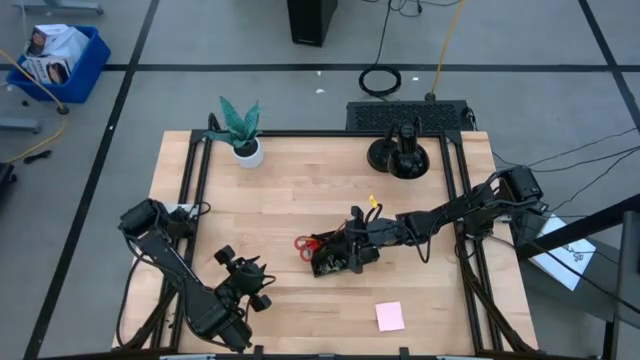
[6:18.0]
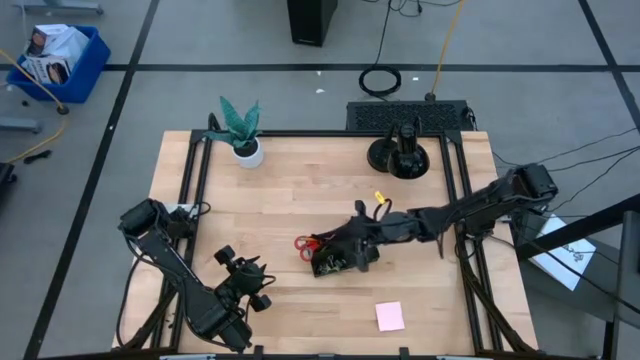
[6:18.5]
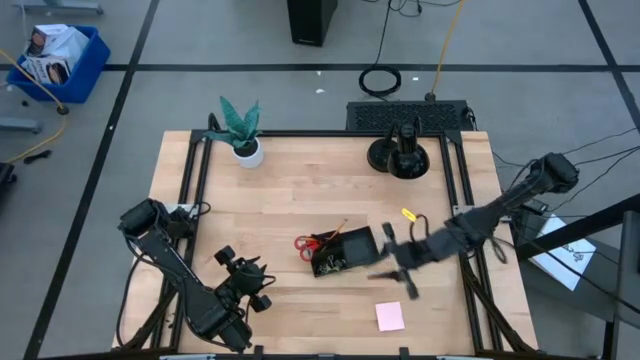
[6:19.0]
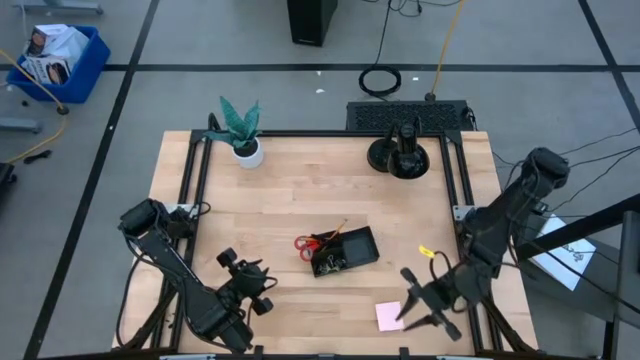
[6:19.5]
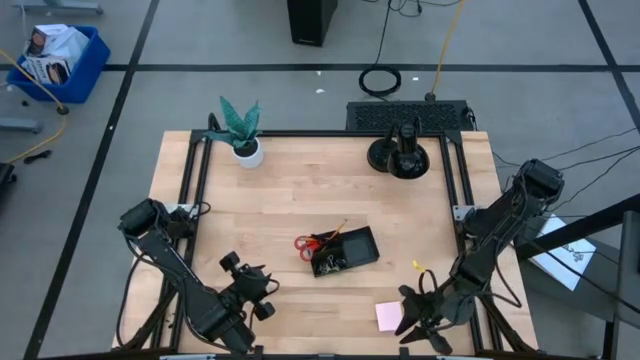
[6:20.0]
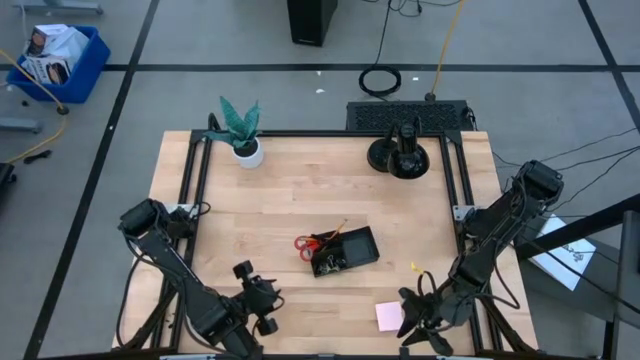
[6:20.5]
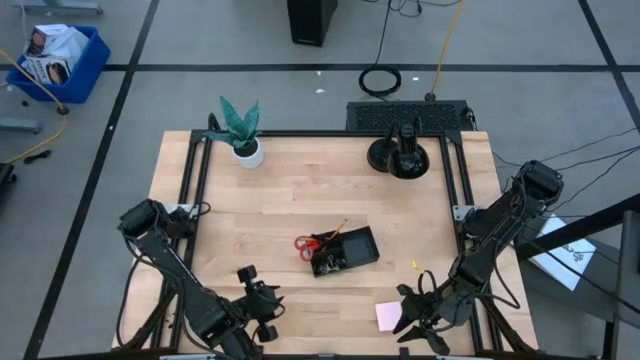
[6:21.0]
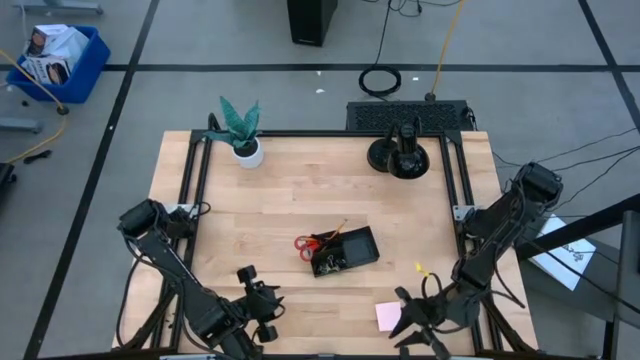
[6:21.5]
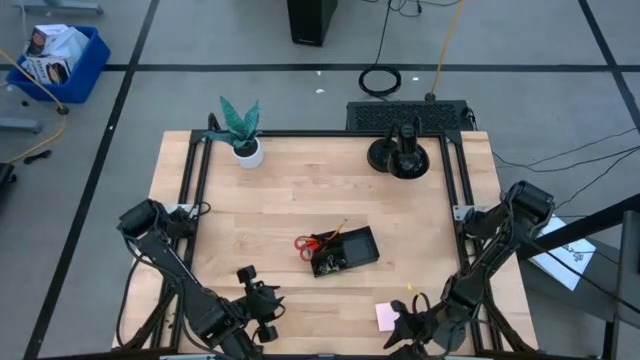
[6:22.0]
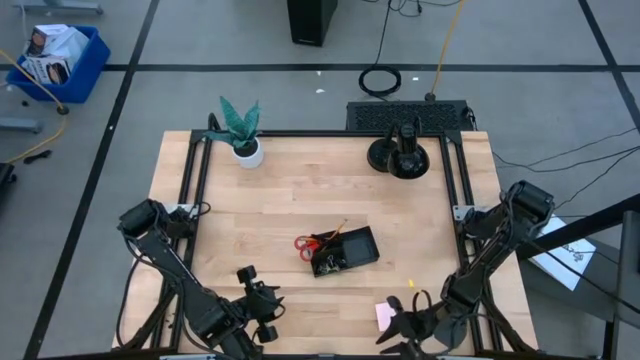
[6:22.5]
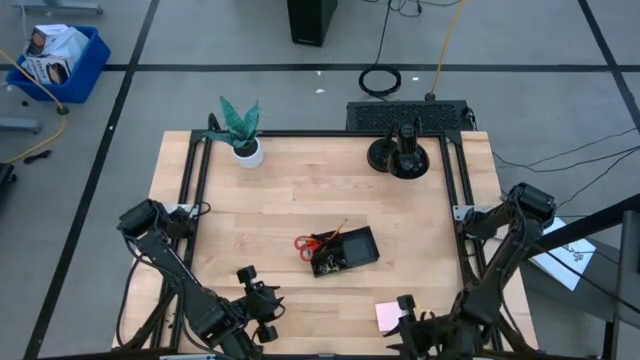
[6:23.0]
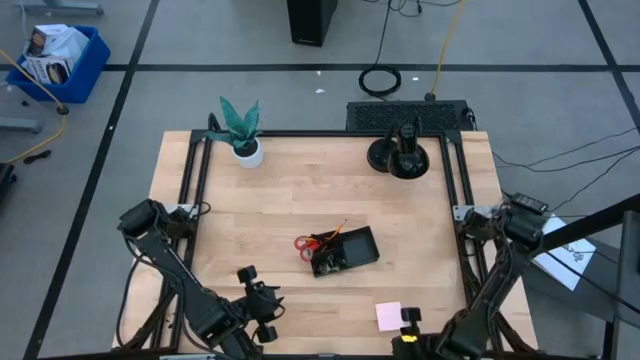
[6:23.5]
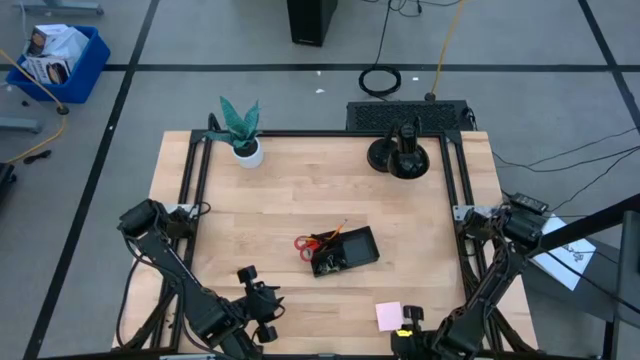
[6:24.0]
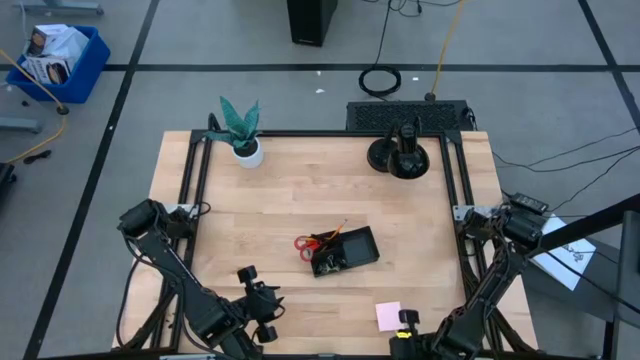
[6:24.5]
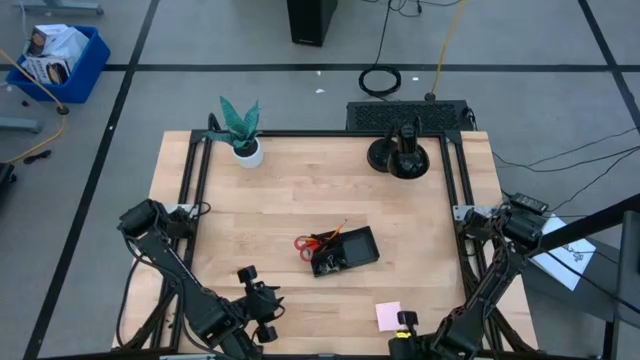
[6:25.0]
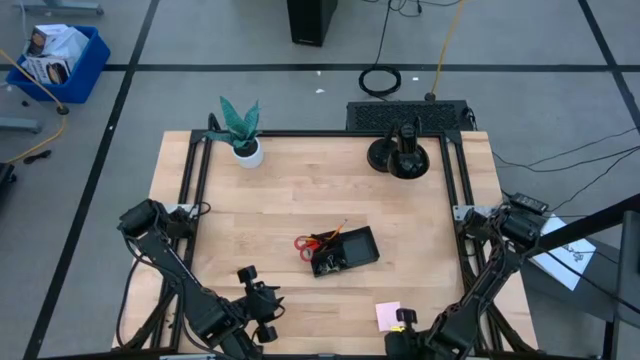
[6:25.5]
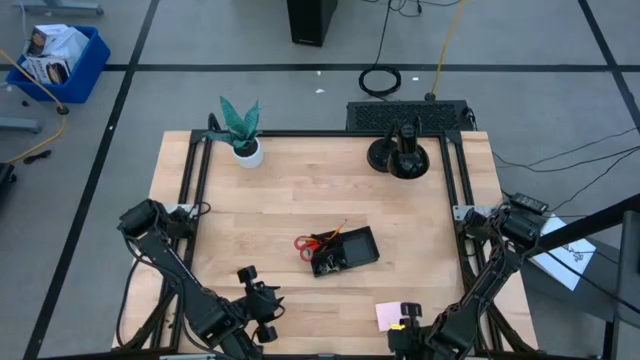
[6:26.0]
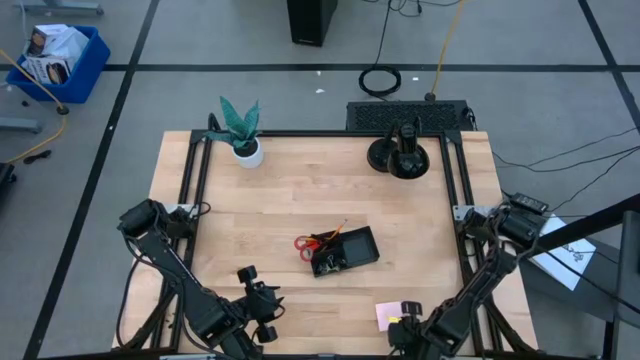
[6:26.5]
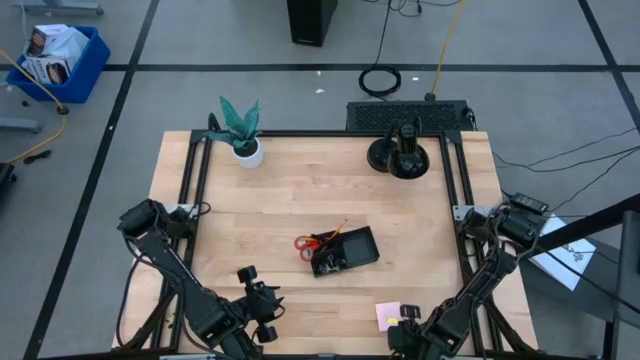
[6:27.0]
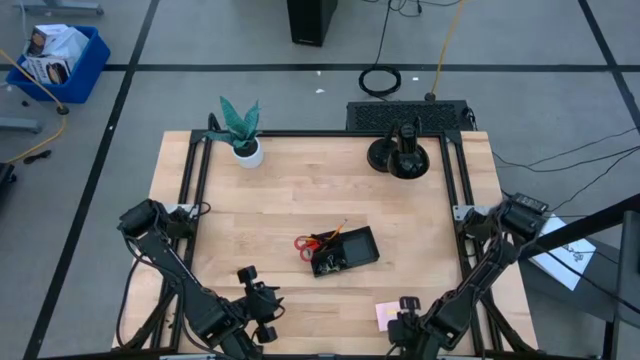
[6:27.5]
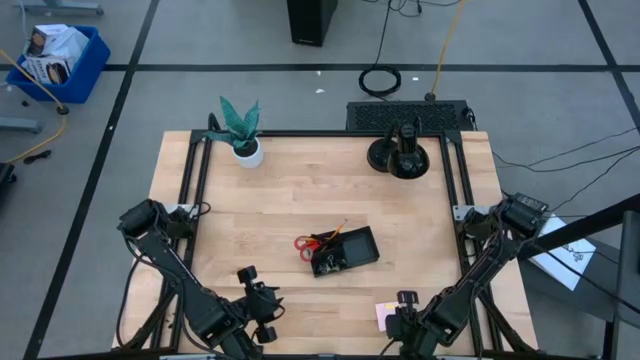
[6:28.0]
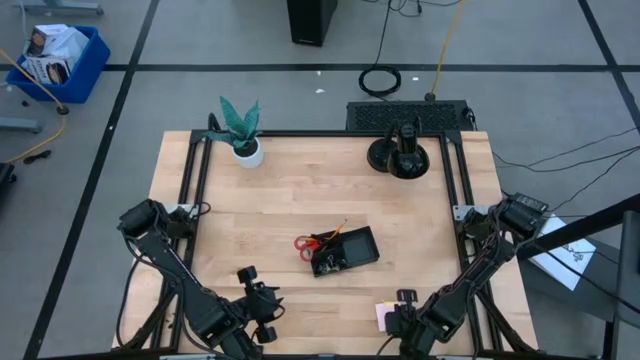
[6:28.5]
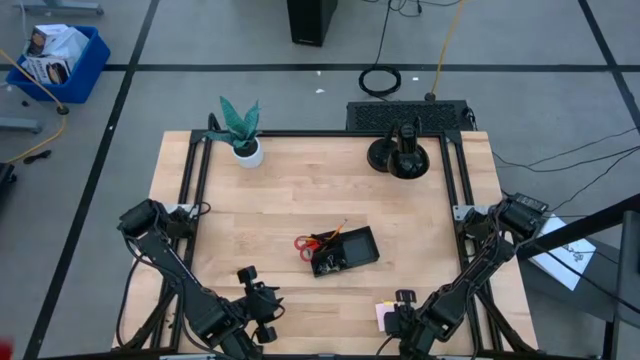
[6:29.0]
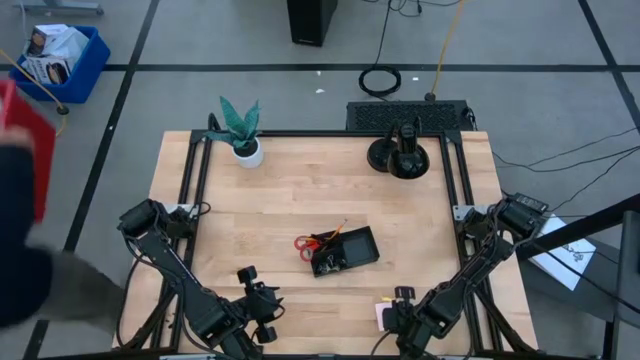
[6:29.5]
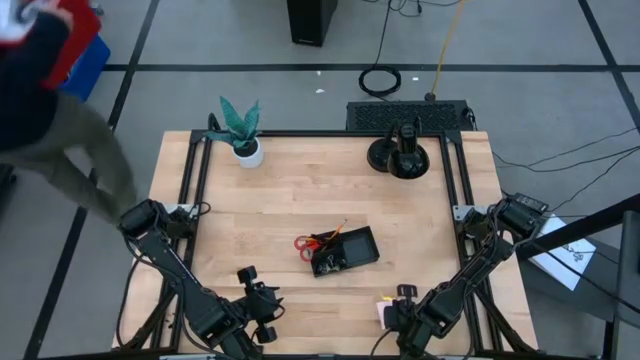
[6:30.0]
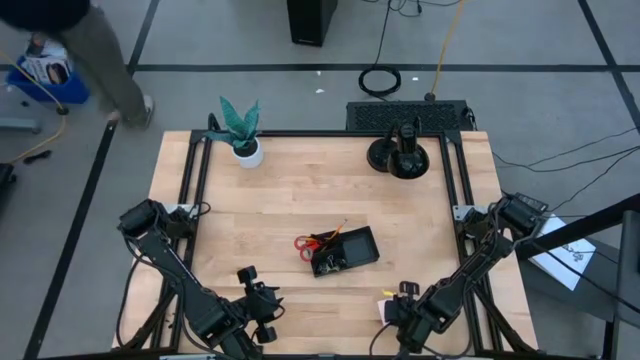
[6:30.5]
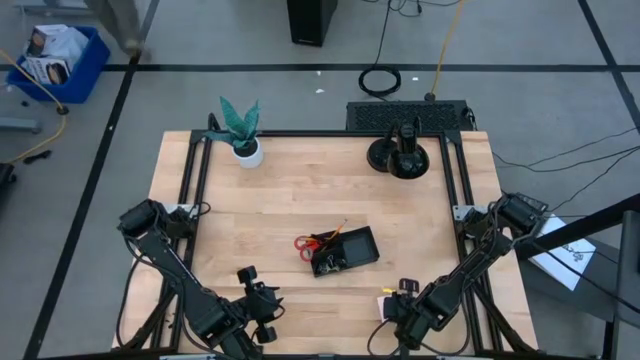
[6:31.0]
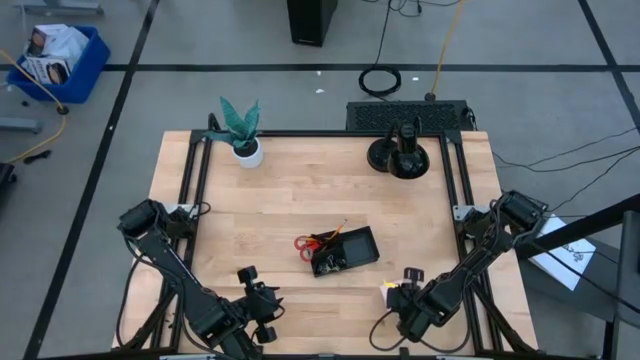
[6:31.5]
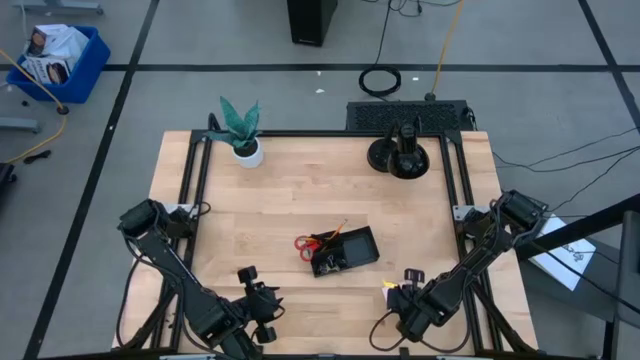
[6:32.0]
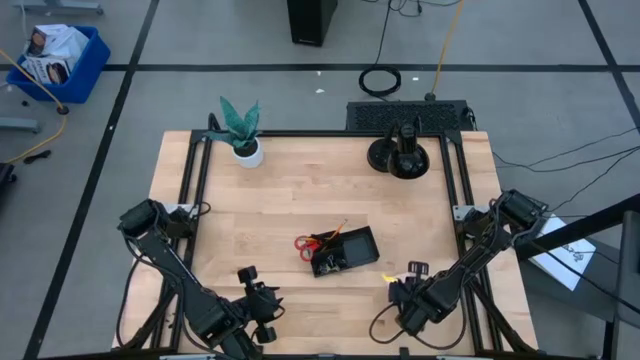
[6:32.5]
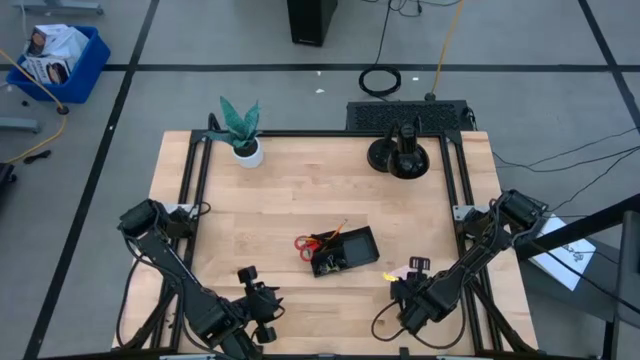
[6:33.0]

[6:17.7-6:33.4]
Task: Pick and place office supplies into organizer
Put the purple sticky notes into the black desk organizer

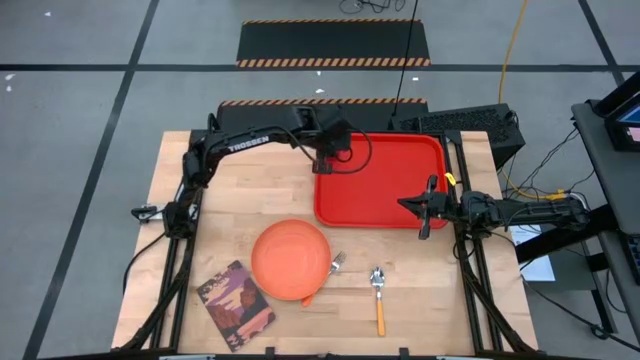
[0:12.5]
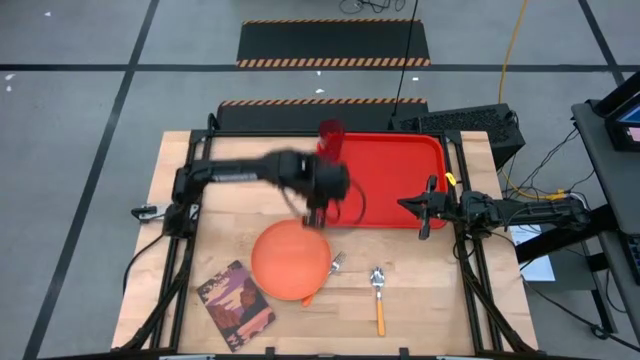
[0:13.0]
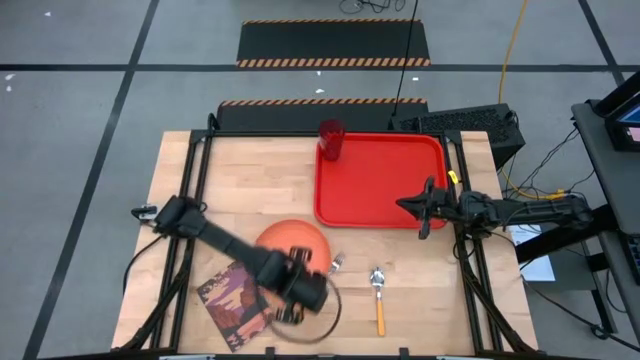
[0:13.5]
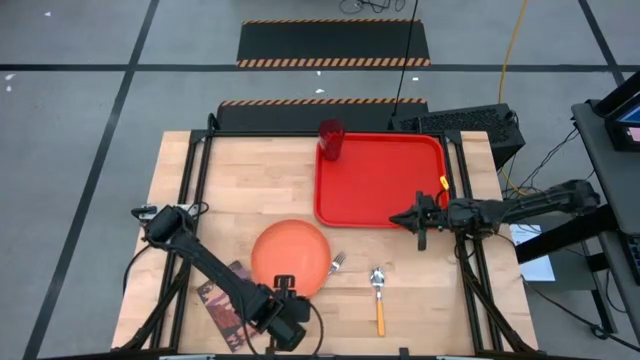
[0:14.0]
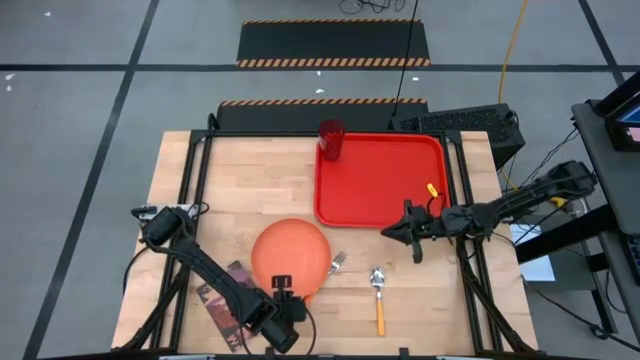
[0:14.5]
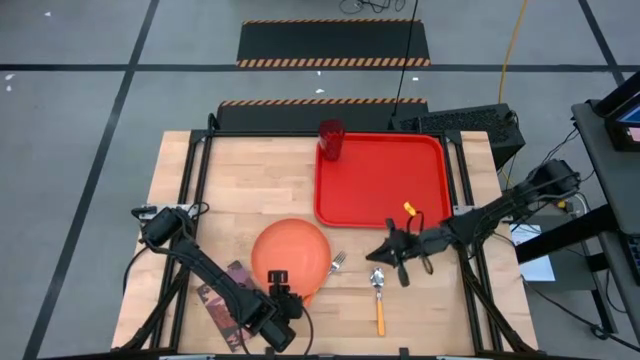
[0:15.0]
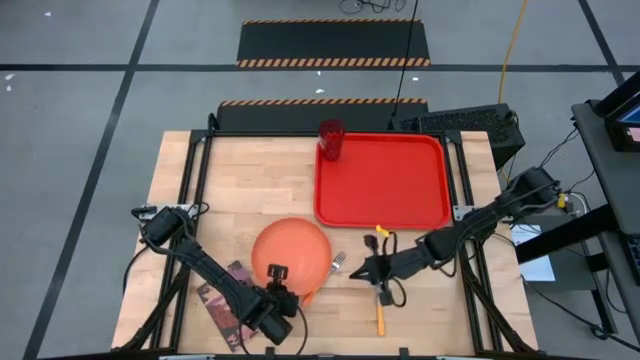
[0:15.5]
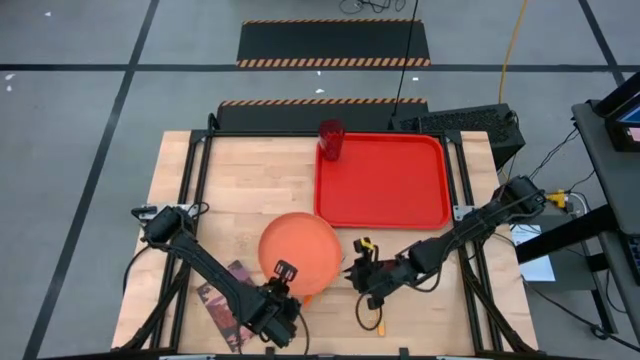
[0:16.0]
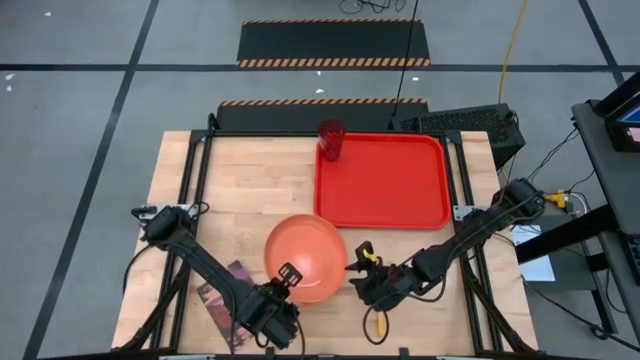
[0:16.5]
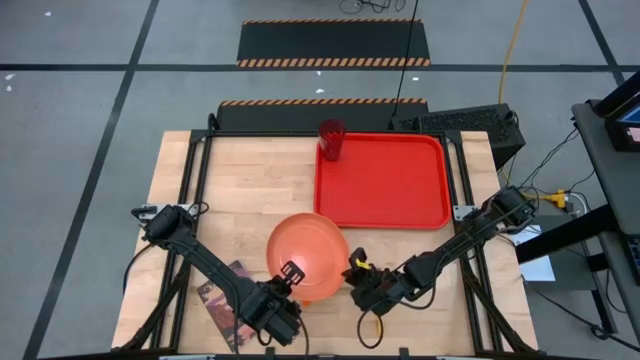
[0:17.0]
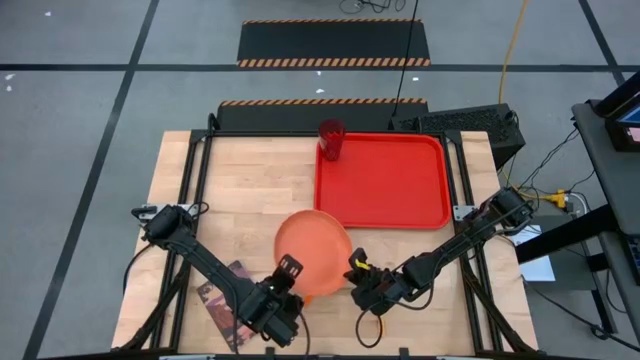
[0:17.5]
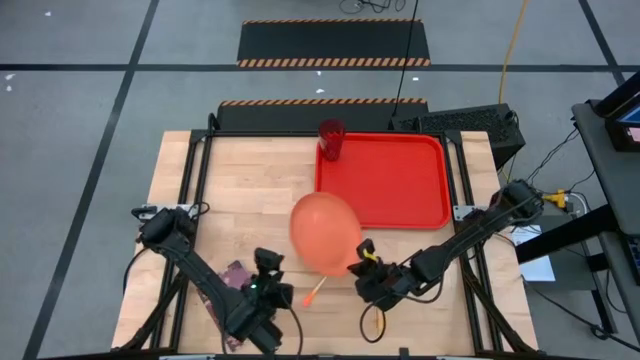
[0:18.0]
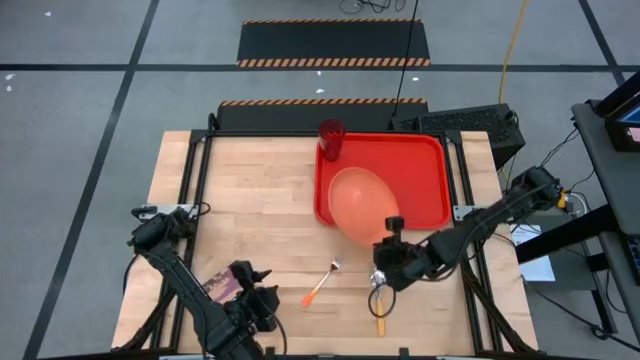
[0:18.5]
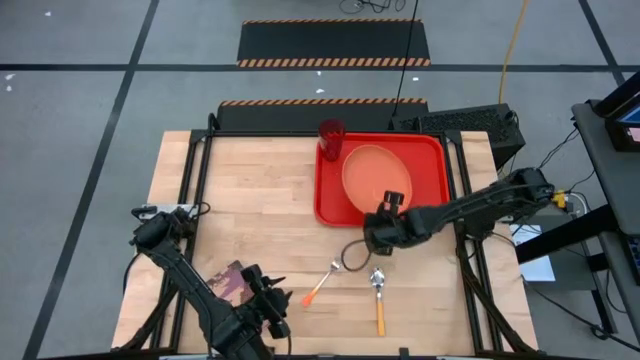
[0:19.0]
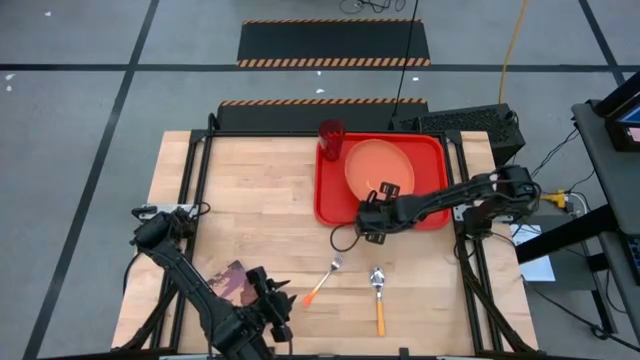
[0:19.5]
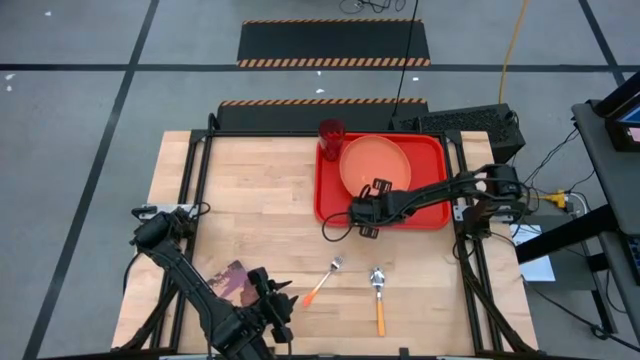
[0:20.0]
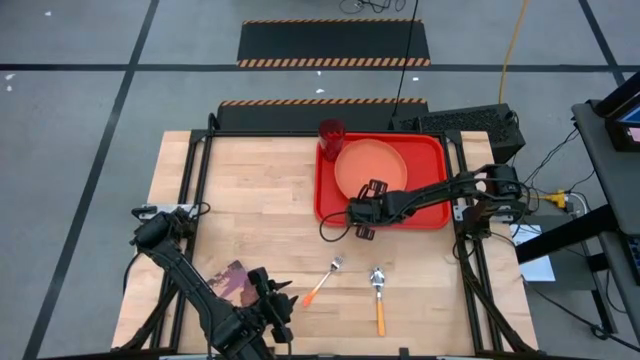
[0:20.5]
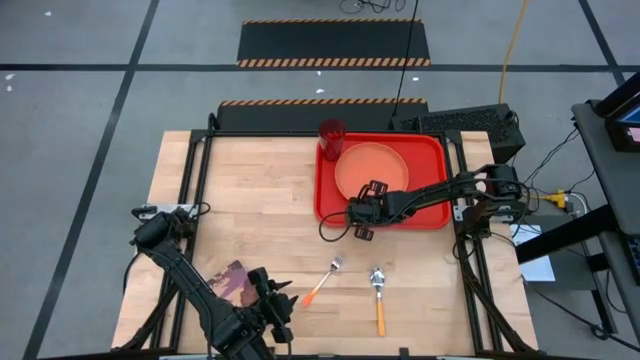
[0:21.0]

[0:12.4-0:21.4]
Task: Pick and place plate/cup/fork/spoon on tray
Put the orange plate on the center of the red tray
